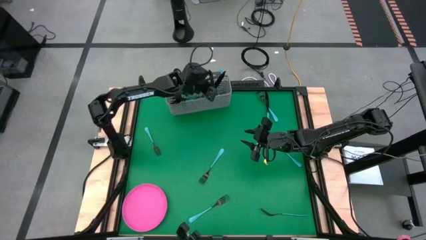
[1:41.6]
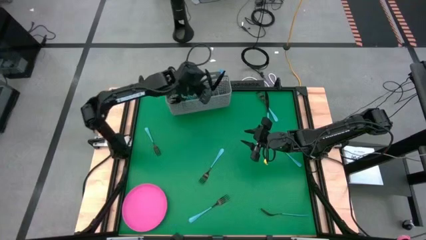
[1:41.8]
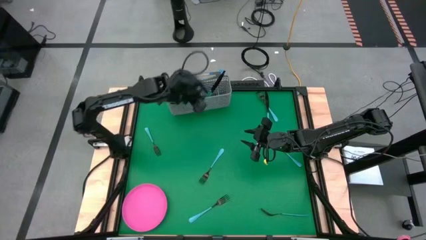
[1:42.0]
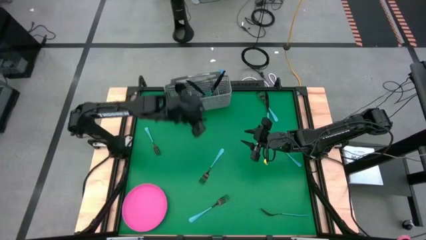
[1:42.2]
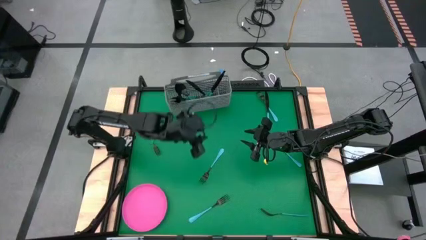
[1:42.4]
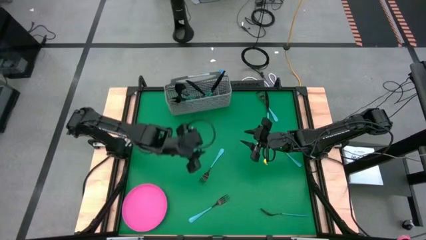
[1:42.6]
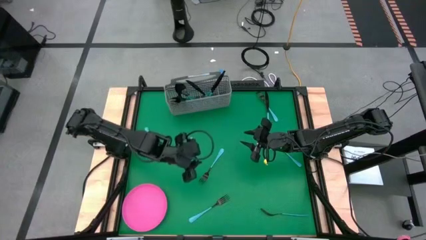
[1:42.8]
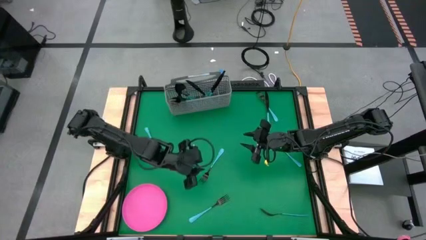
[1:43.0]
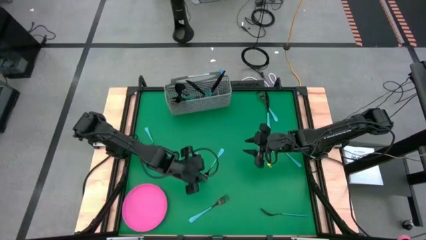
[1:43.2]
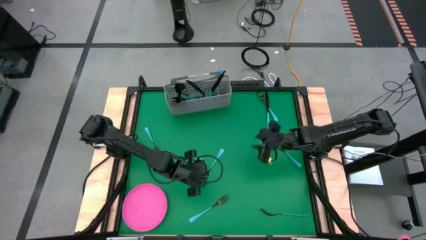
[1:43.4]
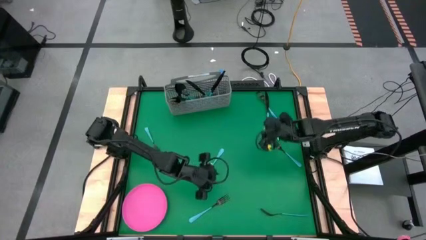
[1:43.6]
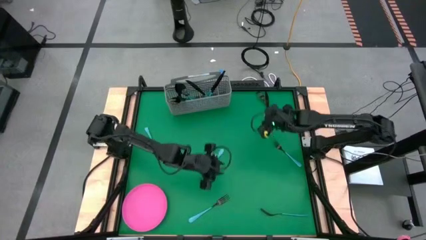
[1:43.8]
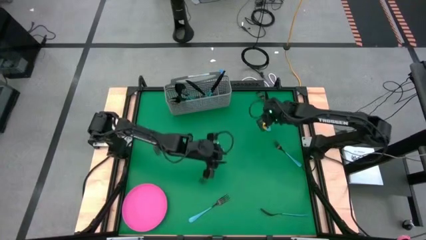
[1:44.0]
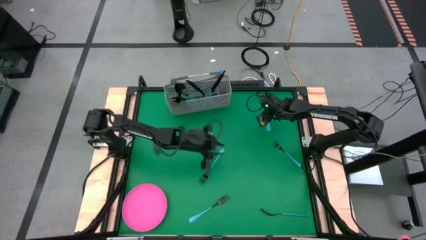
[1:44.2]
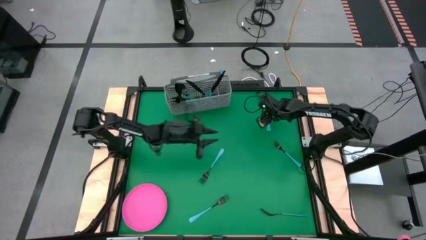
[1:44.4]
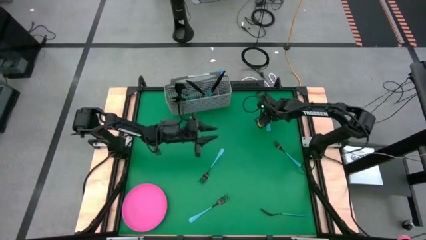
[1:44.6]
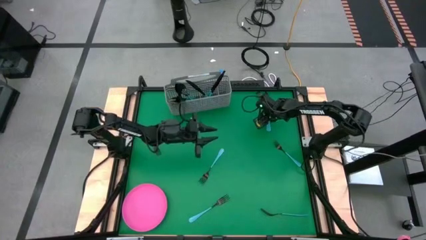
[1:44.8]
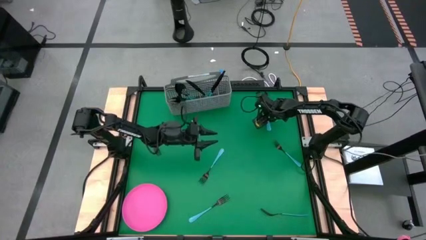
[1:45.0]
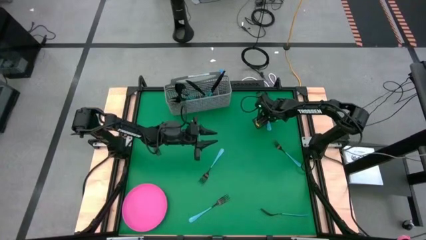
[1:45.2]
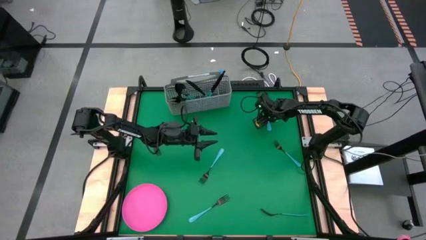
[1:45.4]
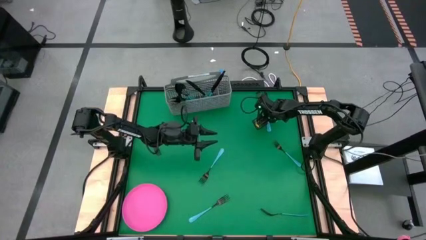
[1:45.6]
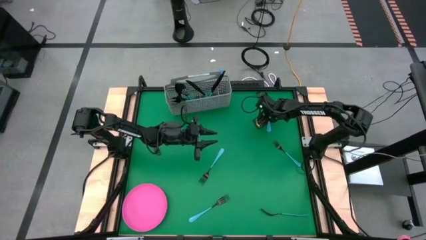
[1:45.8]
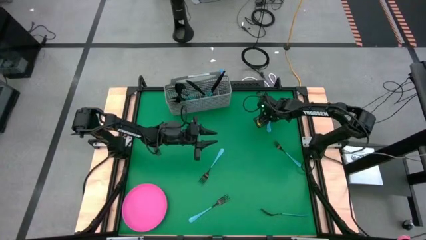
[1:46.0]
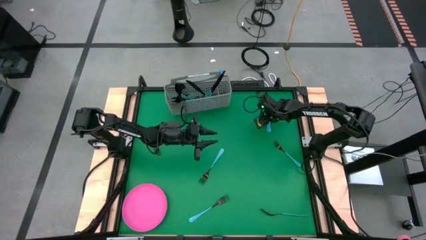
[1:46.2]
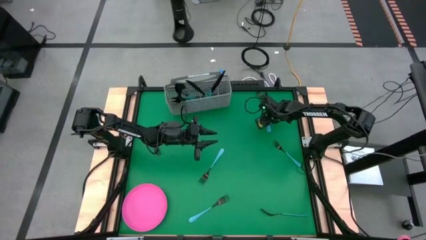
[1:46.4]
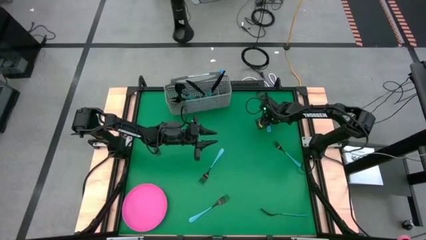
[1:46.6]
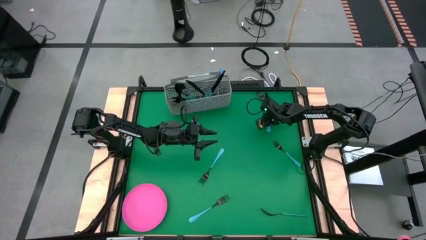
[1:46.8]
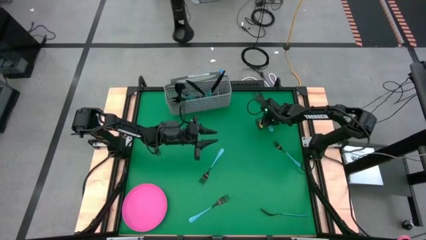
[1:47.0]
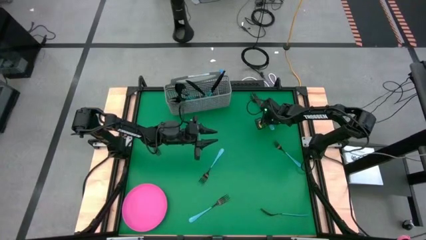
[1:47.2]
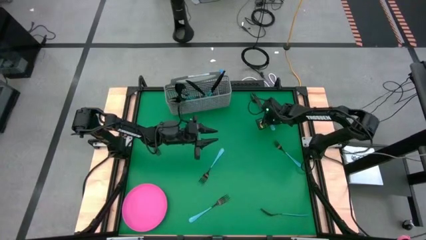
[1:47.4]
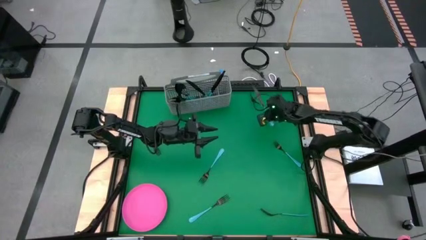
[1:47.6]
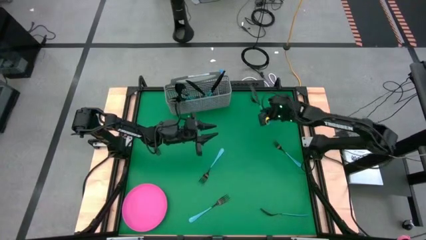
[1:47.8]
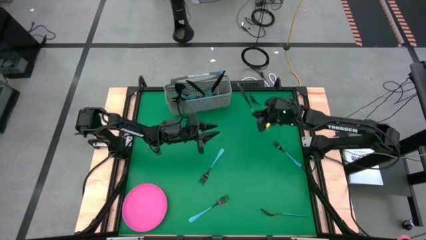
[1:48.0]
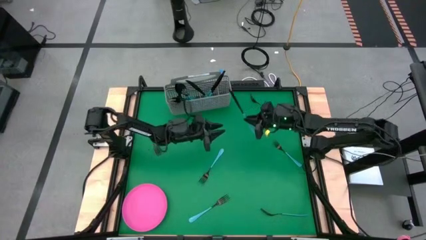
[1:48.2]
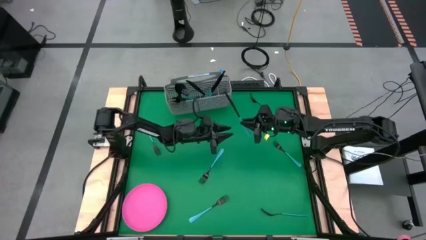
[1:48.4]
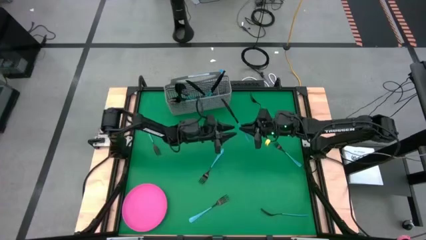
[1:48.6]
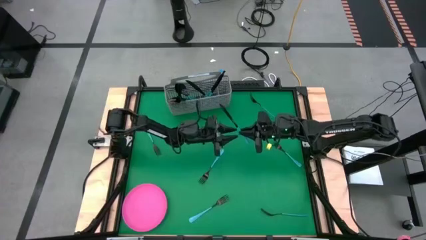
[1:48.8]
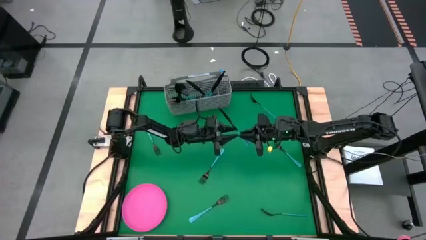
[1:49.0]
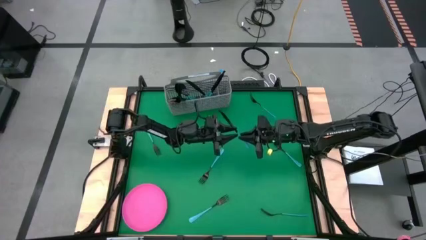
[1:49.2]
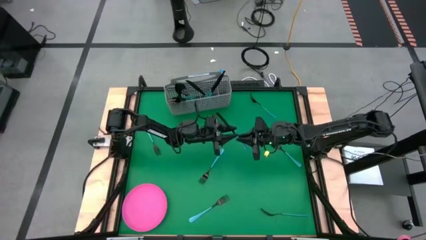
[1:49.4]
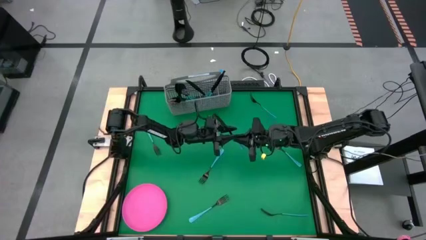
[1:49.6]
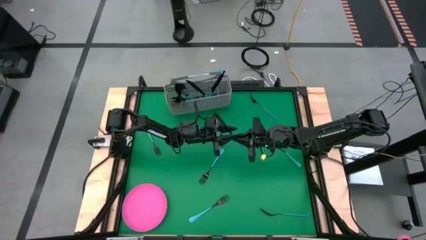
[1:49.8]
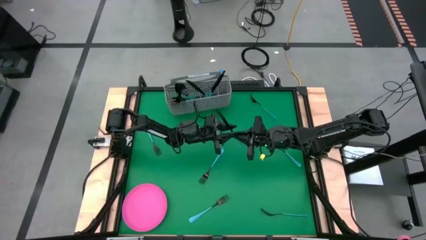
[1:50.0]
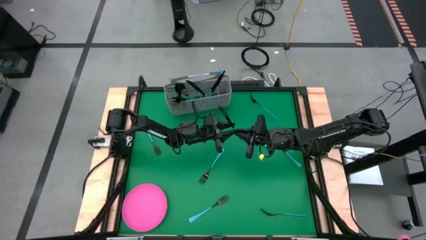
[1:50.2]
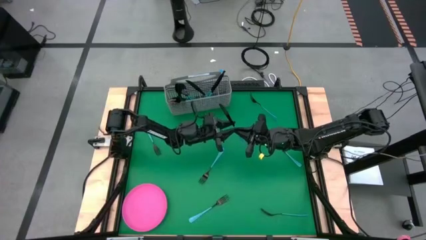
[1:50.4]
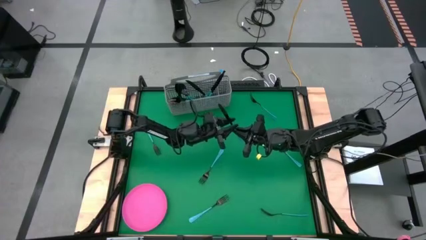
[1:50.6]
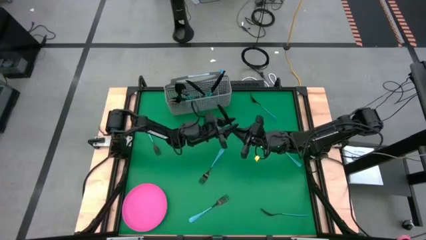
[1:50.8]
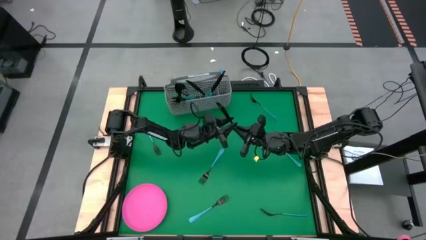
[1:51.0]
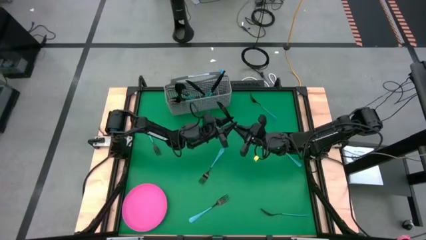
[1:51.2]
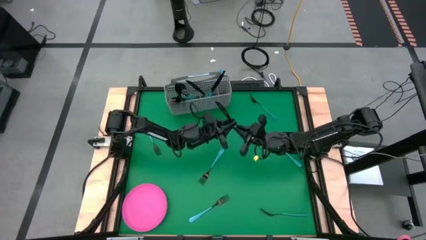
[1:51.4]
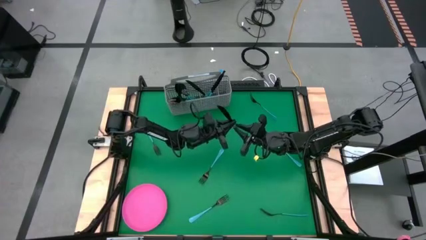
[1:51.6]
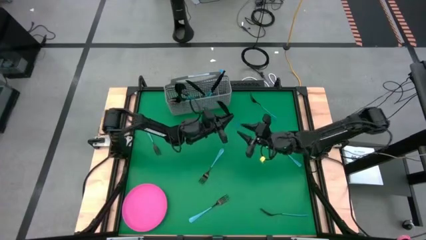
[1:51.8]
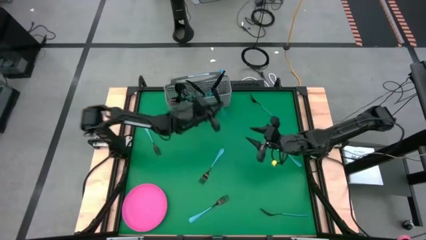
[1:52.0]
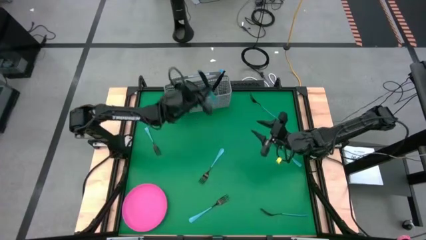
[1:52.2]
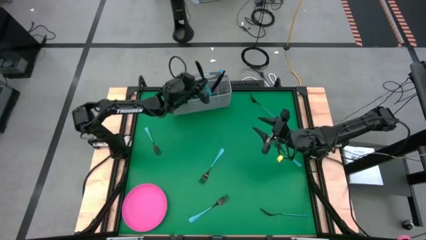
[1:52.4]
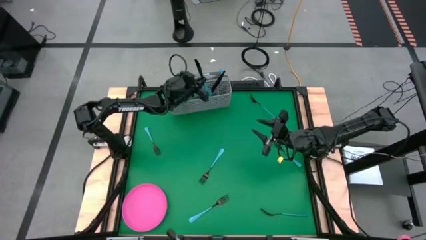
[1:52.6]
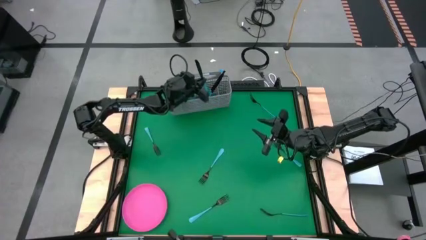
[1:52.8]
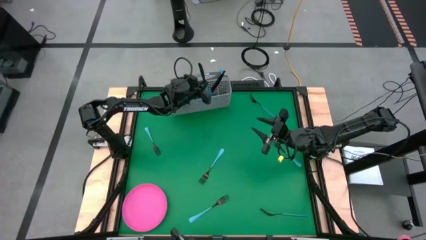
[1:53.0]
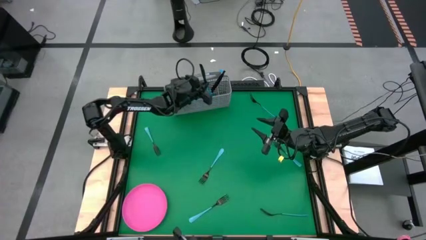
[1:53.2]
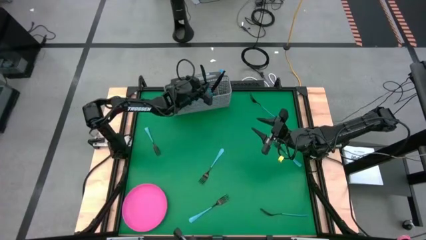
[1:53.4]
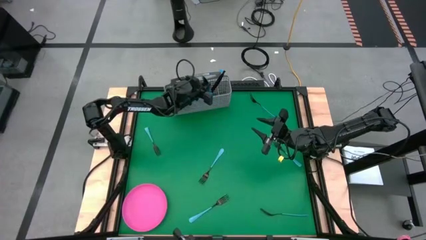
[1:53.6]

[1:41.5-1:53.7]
Task: Sort silverware
Put the table knife into the silverware basket

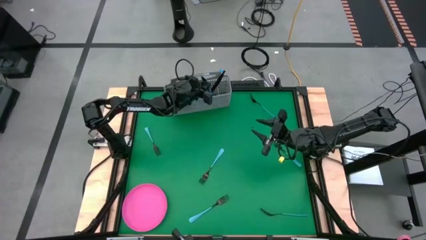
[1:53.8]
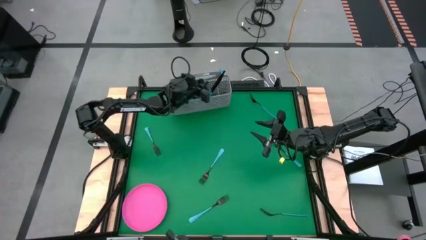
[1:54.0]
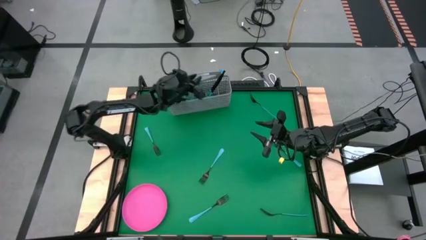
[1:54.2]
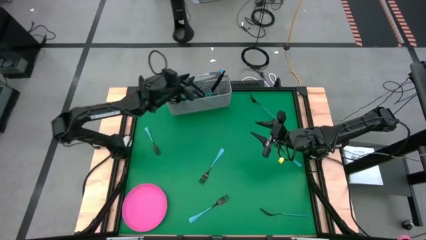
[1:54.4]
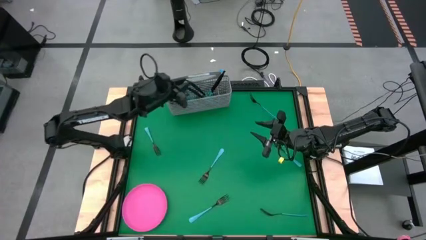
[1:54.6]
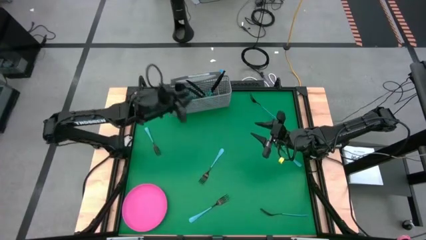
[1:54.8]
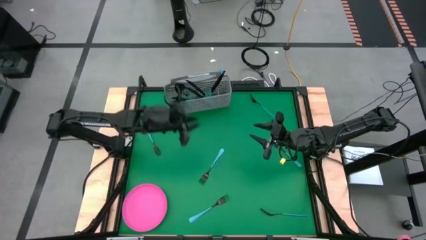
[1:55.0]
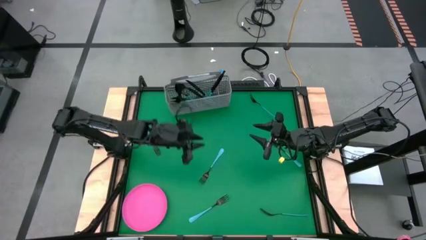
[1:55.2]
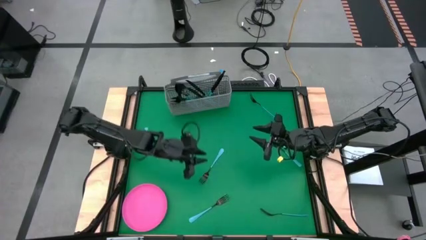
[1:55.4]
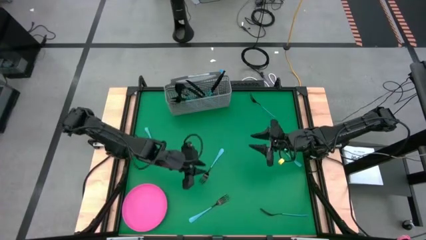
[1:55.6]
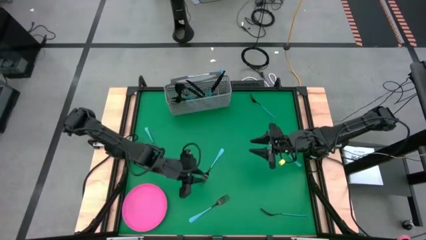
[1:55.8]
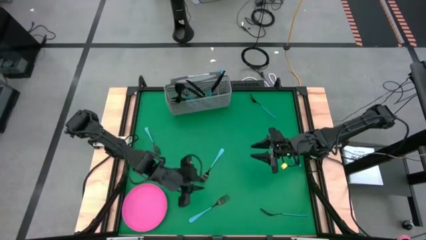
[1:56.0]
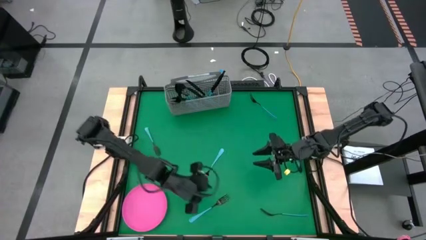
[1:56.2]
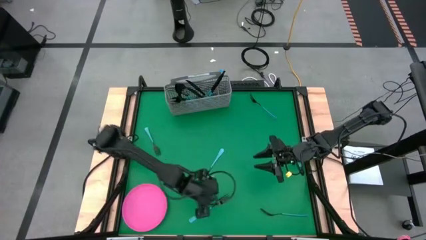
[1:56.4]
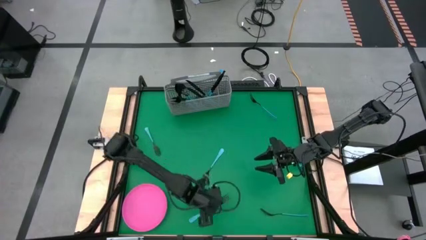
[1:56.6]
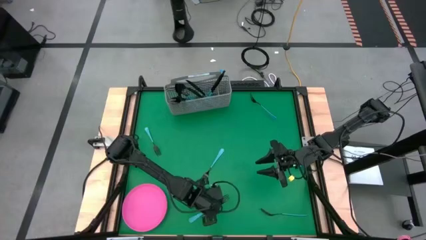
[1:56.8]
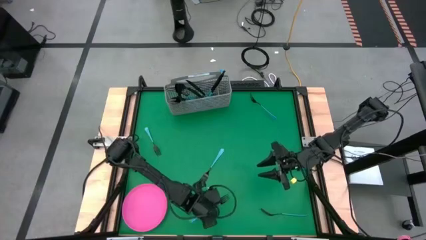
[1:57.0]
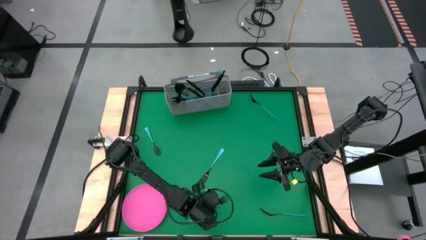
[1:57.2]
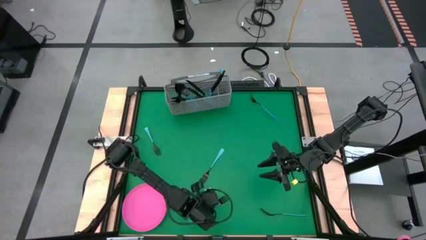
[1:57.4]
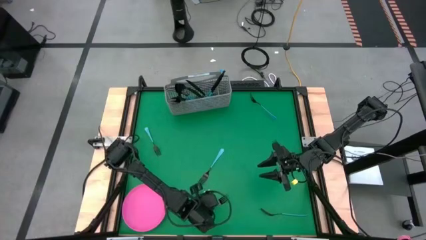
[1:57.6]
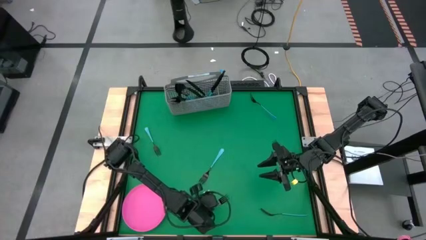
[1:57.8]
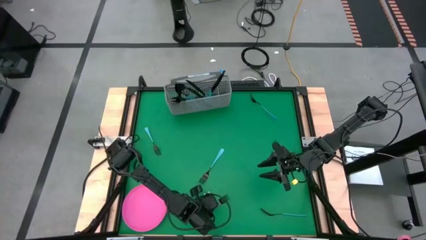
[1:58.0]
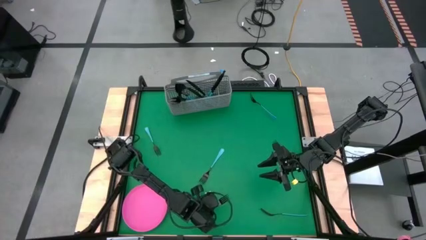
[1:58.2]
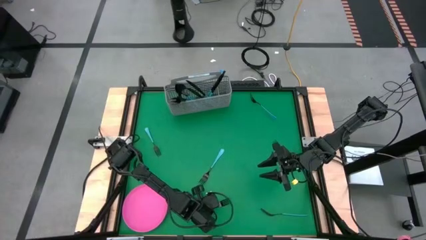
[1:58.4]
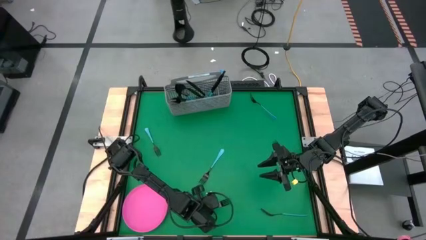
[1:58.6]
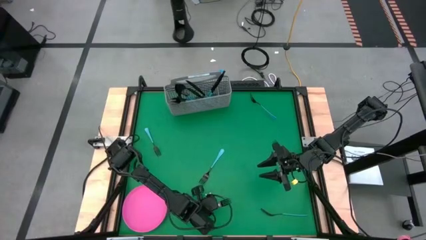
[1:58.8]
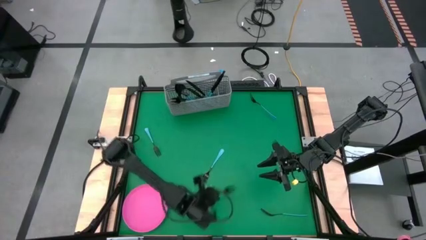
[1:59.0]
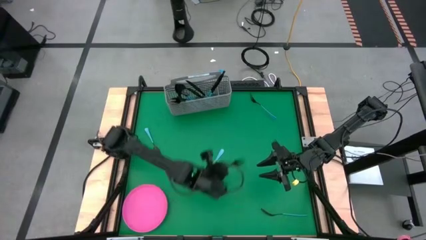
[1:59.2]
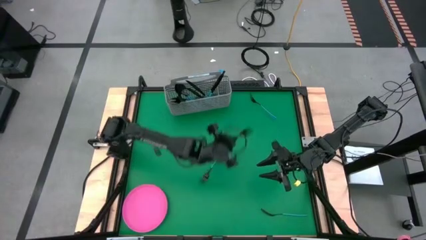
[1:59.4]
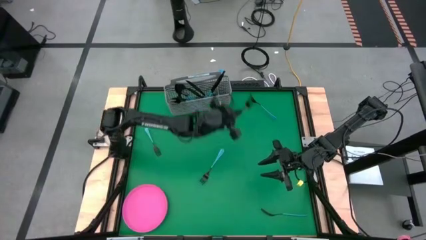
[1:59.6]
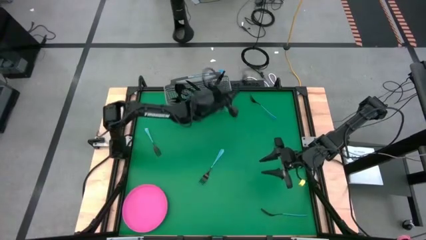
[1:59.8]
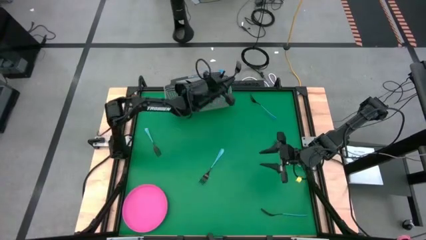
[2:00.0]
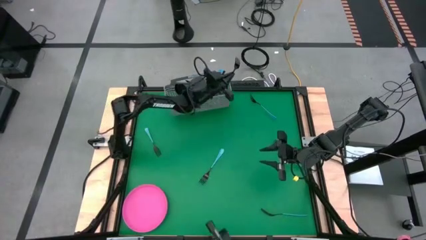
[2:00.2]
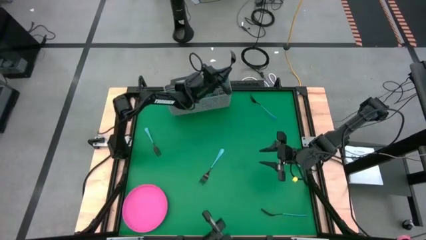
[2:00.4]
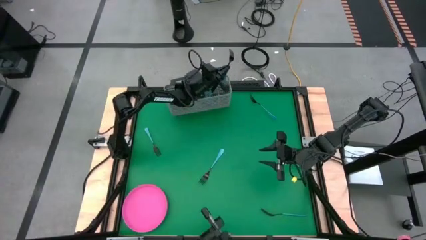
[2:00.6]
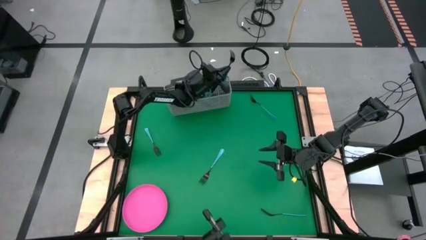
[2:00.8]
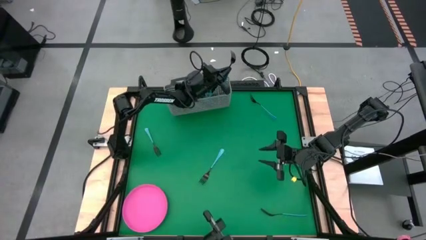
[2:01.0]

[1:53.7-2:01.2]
Put the blue fork into the silverware basket
